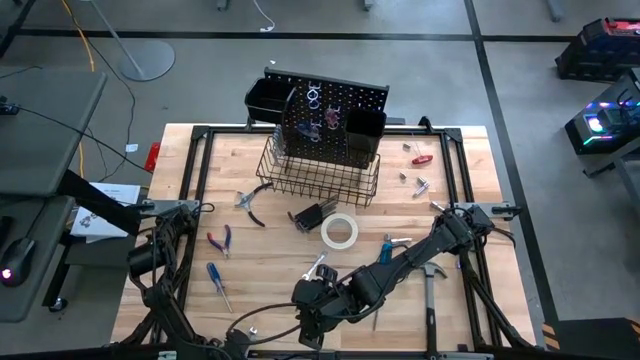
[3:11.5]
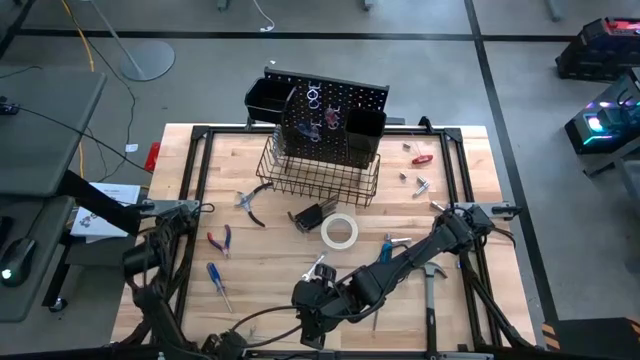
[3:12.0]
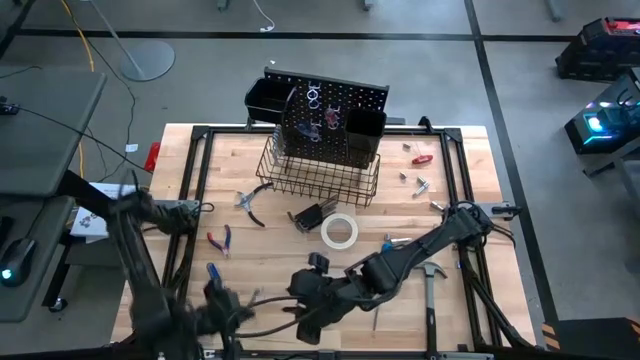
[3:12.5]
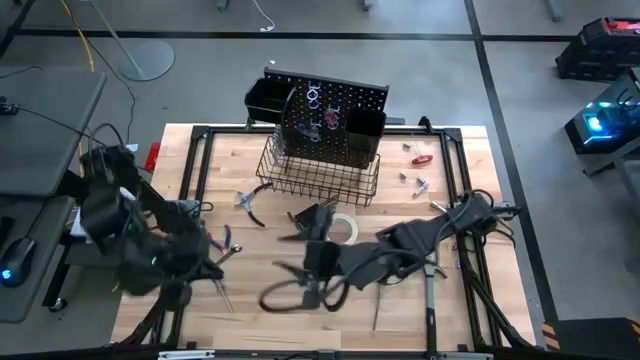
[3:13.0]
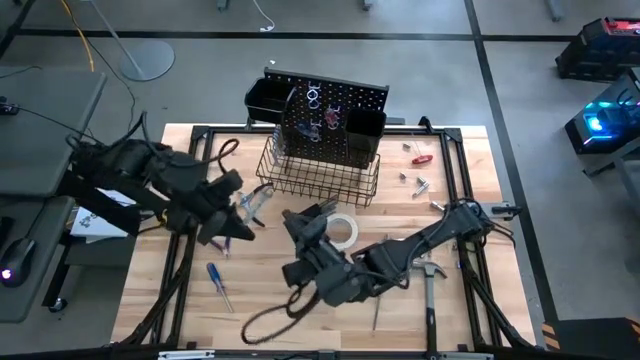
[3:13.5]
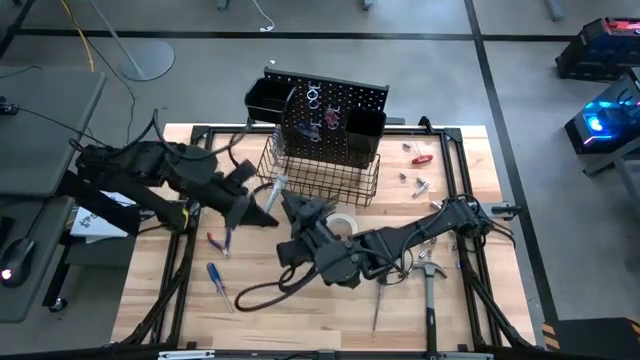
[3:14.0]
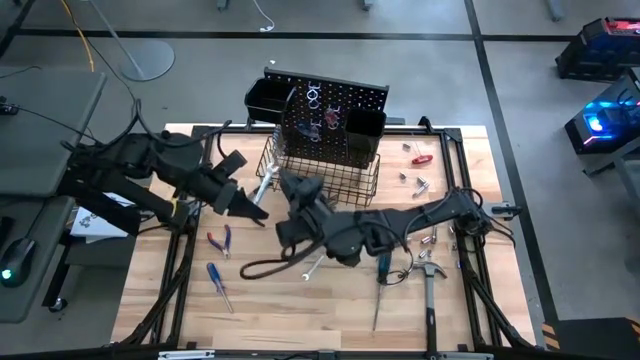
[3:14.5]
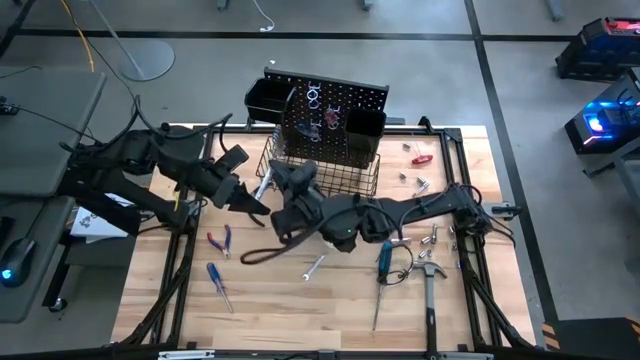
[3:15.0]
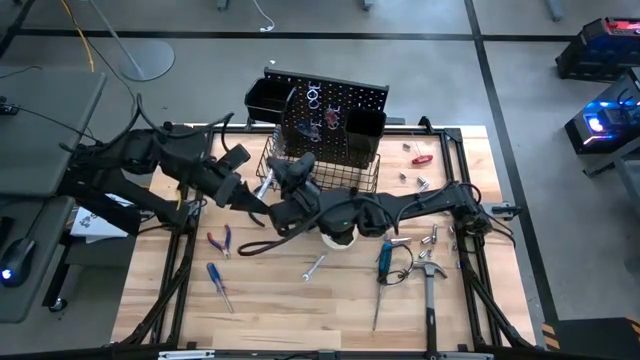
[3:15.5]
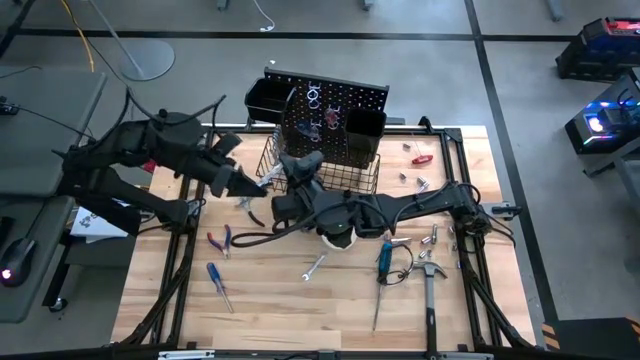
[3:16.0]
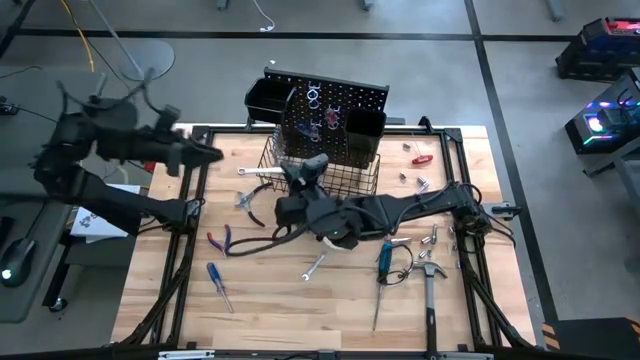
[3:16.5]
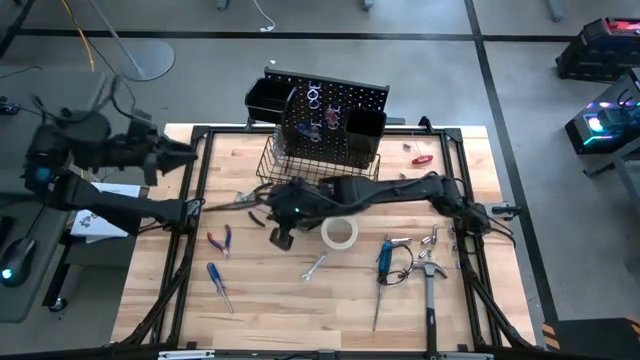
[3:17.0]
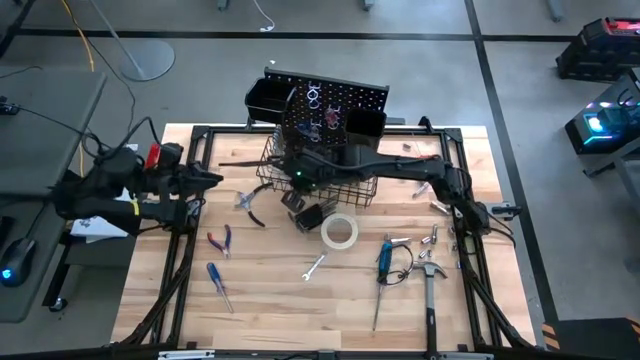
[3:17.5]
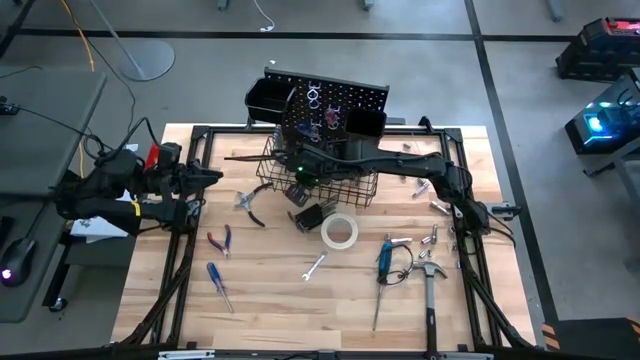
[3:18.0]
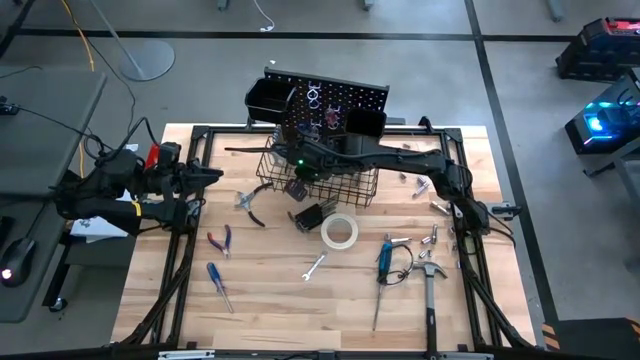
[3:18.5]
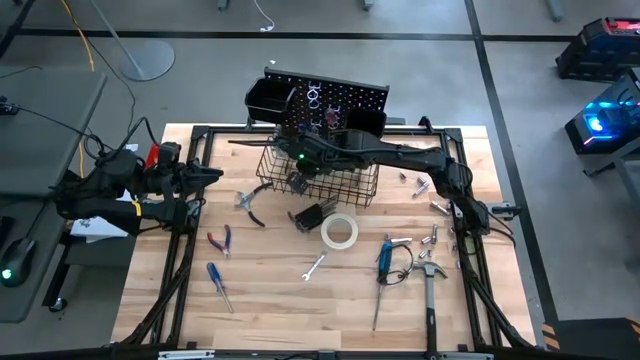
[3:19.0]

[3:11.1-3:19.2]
Task: Hang tools onto peg board
Hang the wrench on the peg board

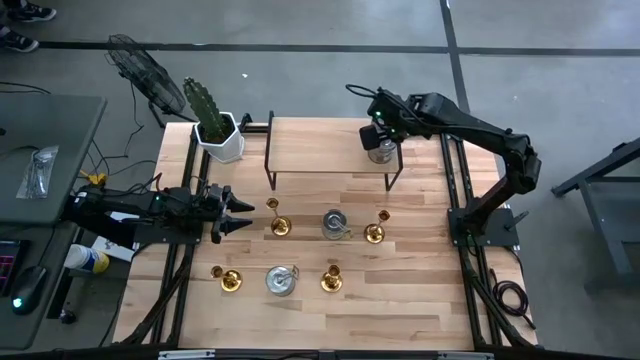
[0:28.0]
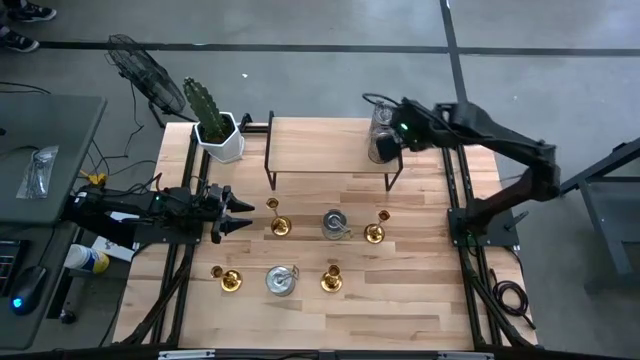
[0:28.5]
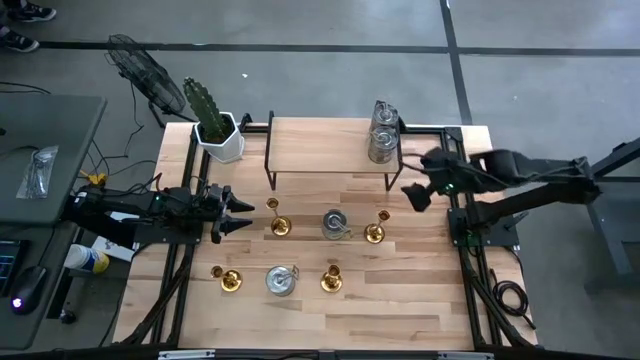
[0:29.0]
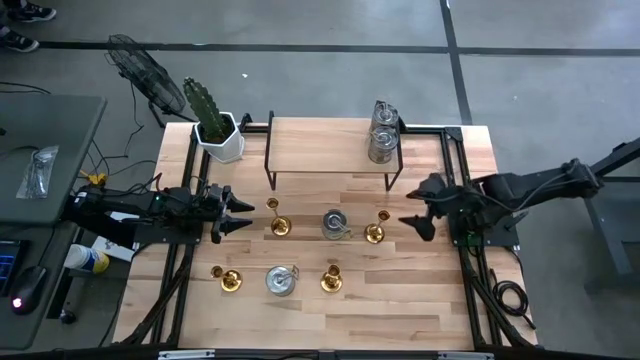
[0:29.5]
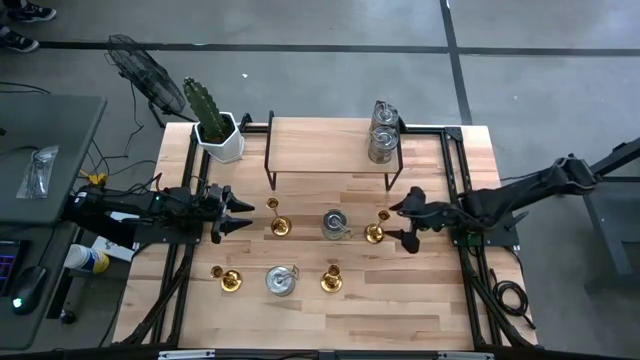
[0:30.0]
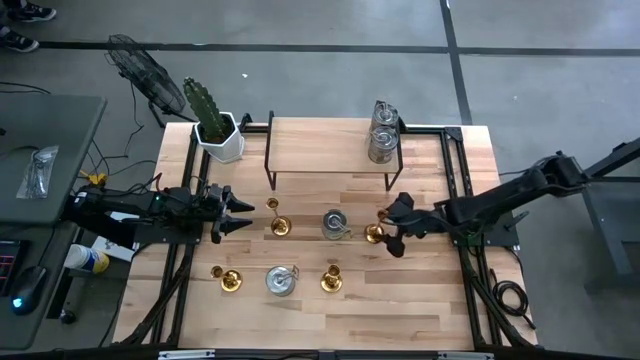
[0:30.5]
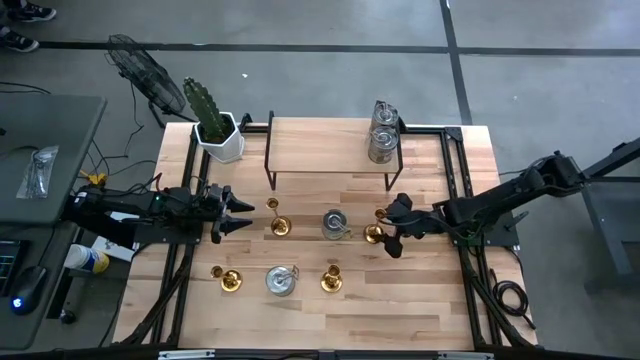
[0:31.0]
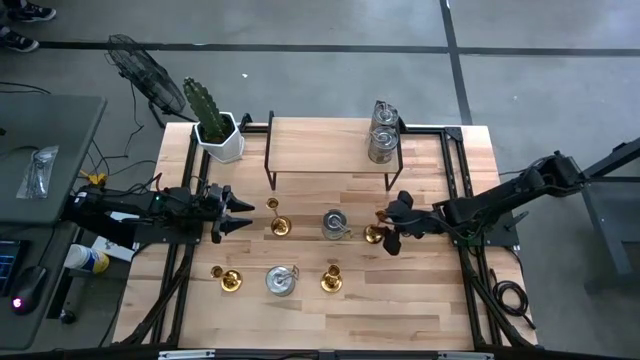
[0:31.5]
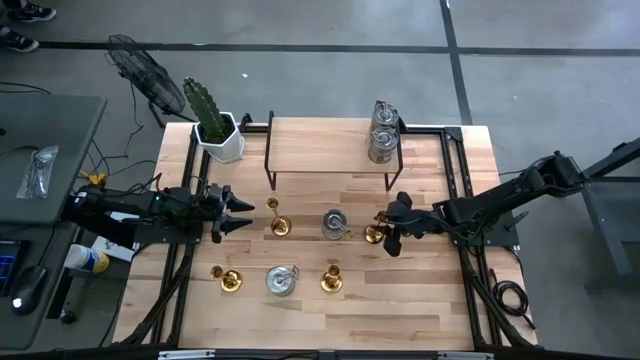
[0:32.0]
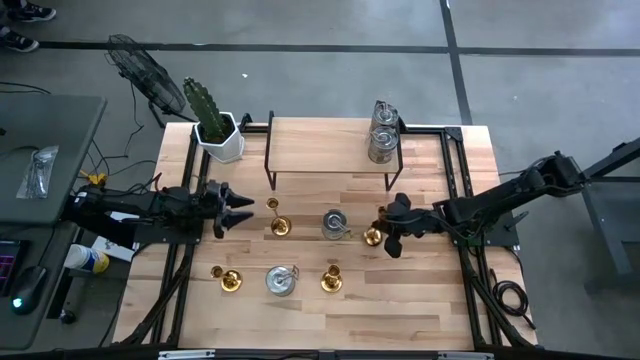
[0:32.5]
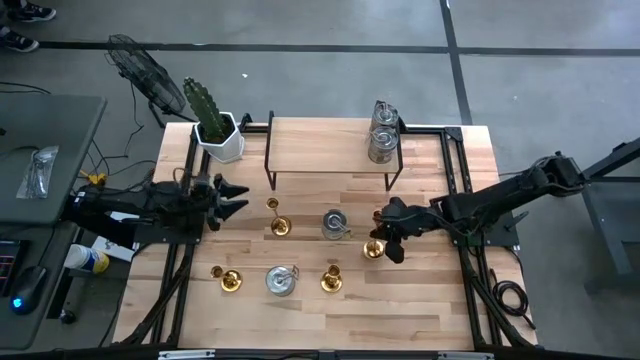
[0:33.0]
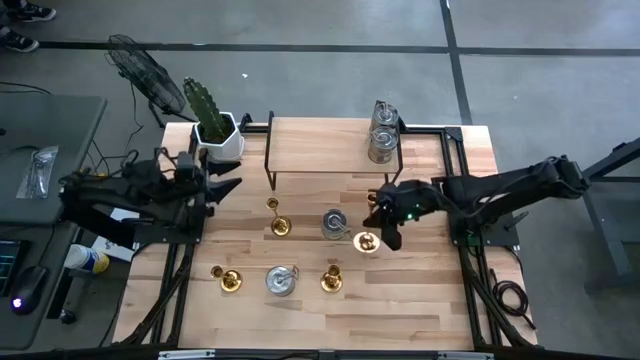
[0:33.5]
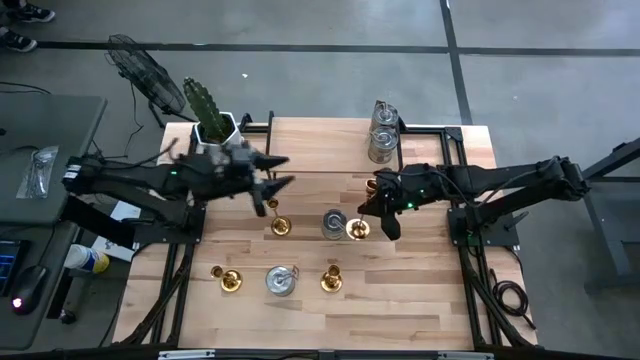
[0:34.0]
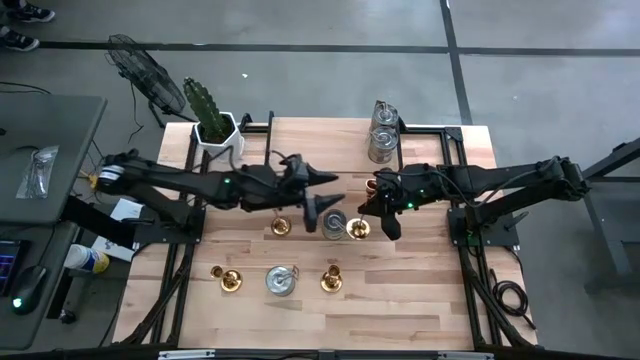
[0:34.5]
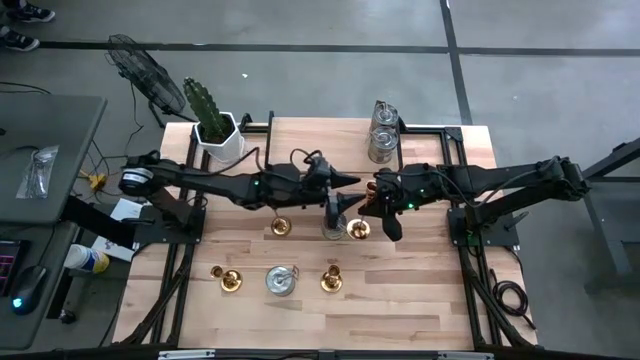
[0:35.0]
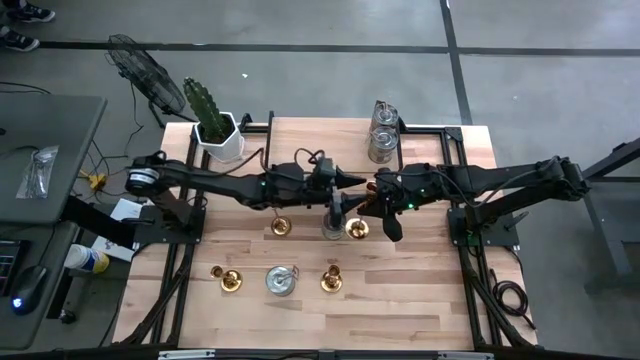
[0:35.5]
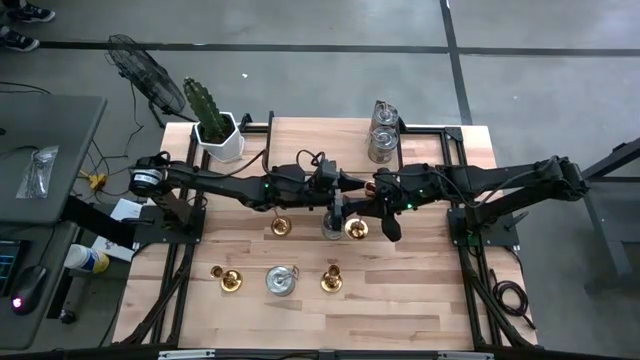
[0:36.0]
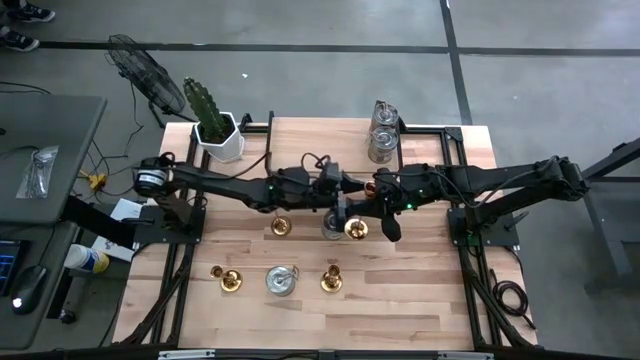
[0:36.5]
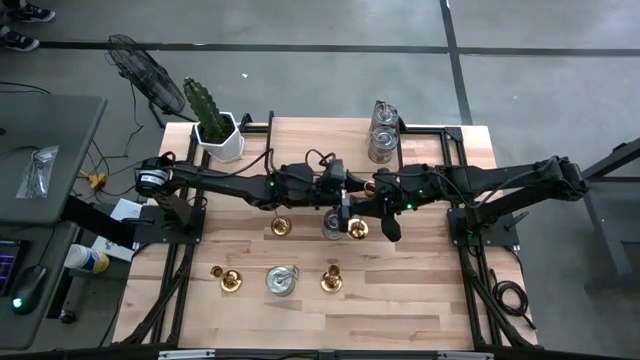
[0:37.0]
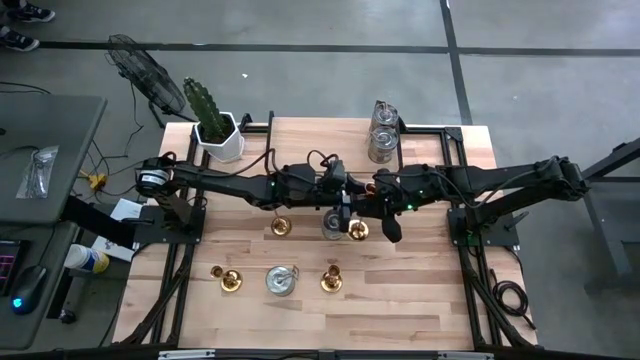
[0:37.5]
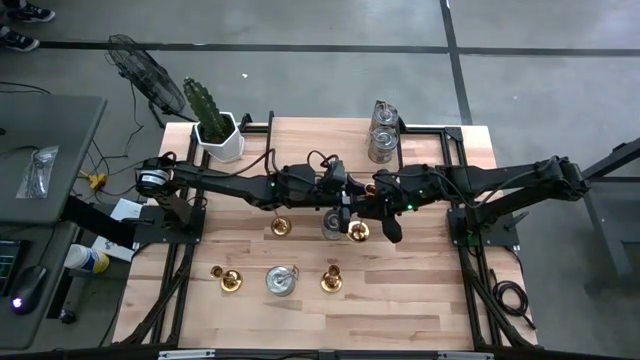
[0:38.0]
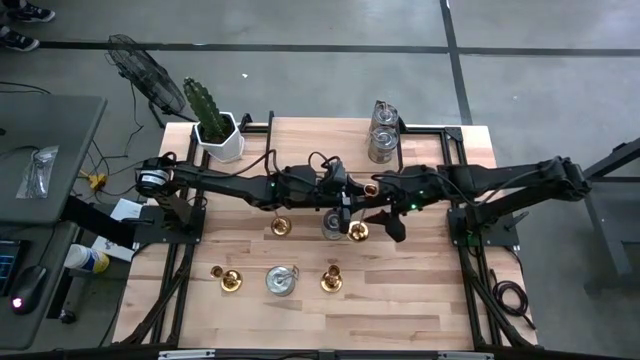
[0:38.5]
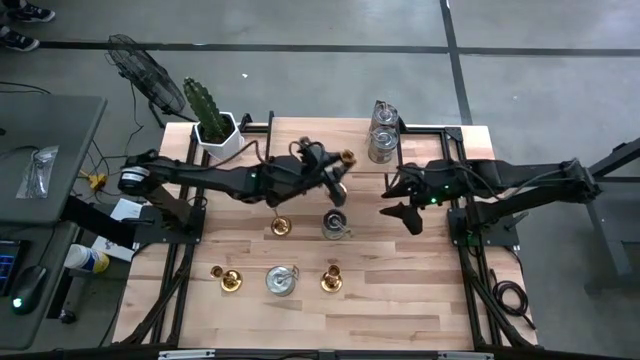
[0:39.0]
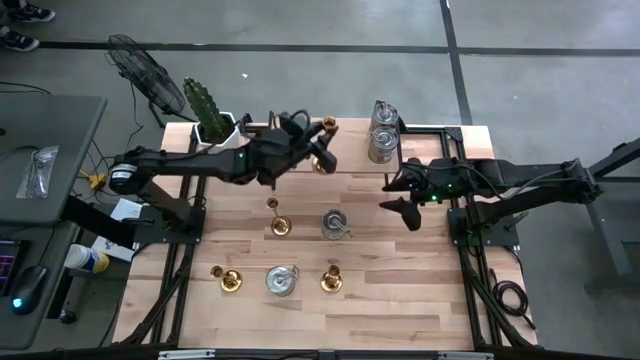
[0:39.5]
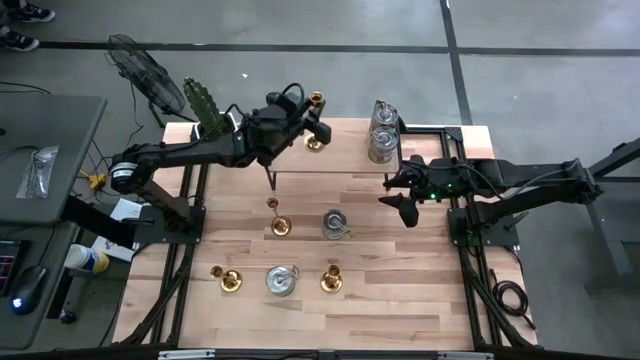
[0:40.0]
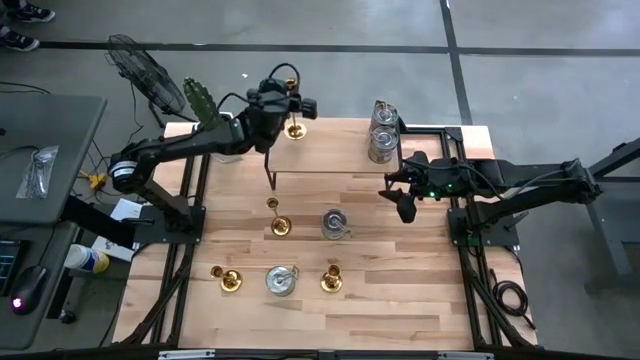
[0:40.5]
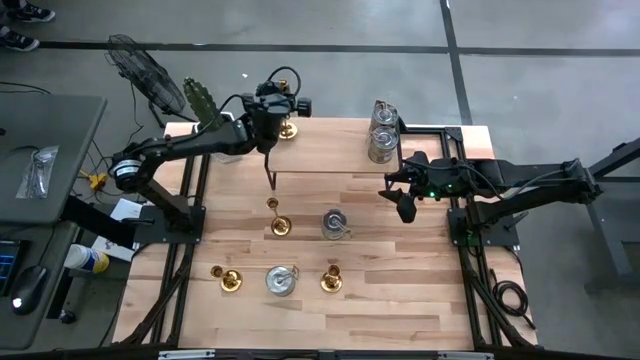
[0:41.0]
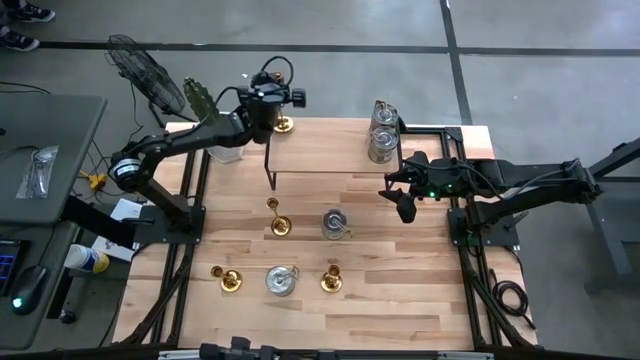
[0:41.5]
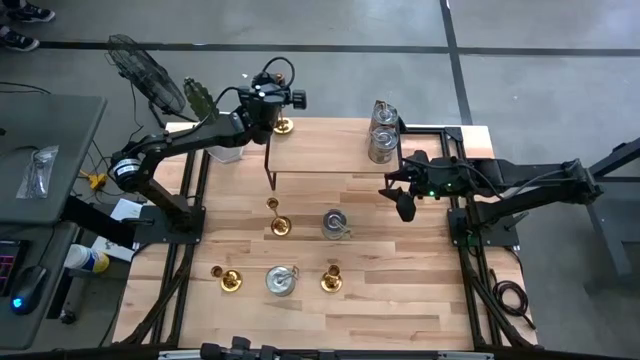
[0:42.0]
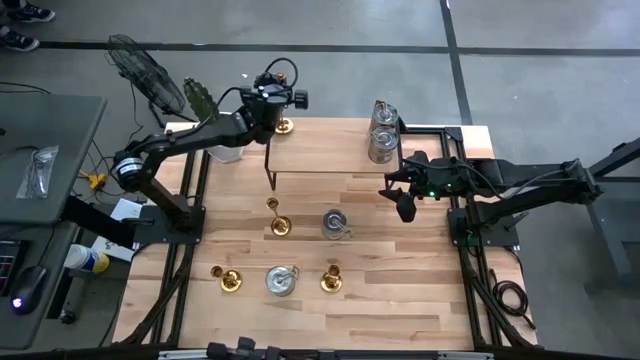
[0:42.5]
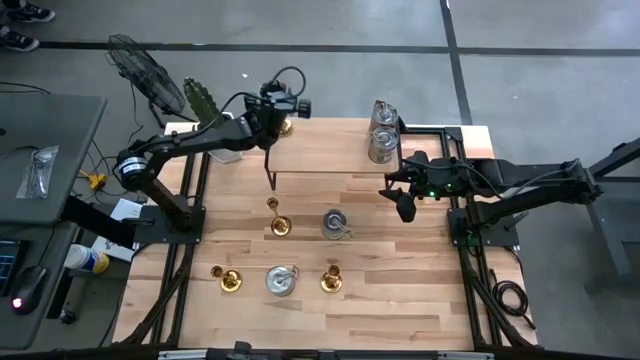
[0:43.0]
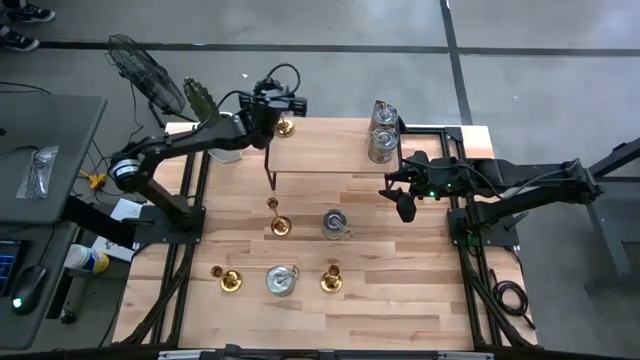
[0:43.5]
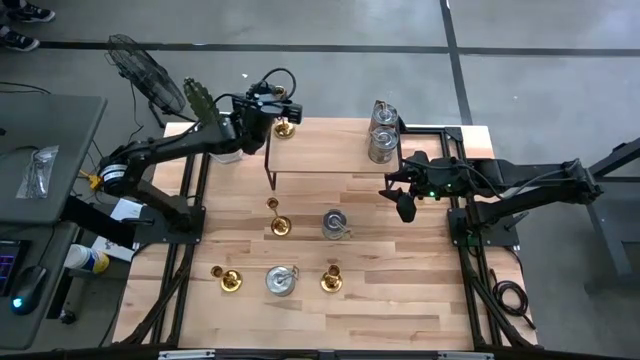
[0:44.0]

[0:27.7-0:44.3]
Task: Pick & Place candle stick holders
Put the gold candle holder on the shelf
